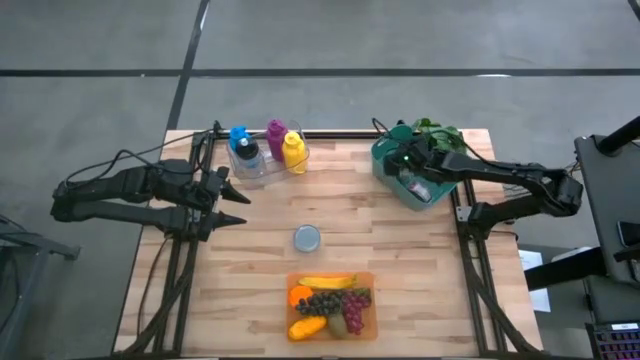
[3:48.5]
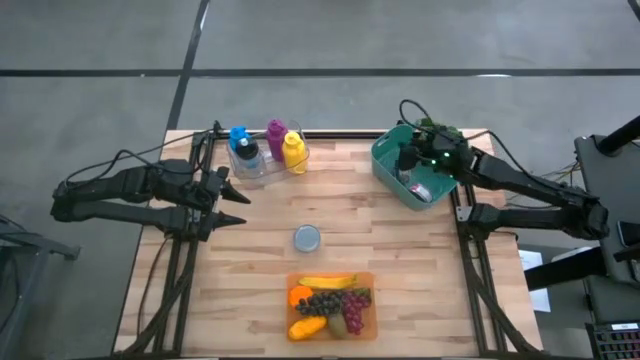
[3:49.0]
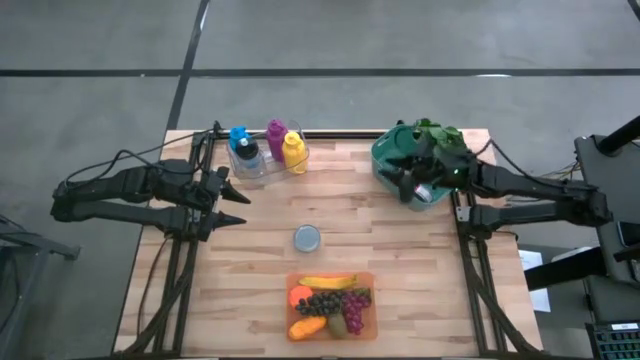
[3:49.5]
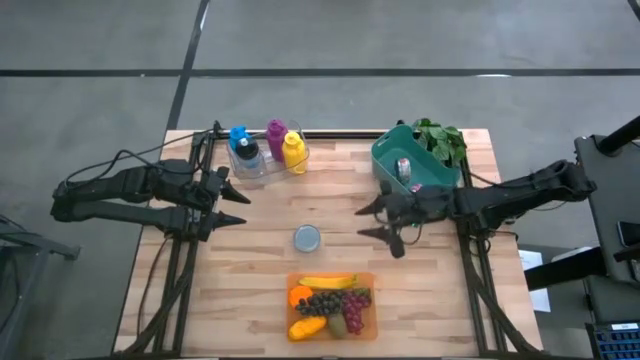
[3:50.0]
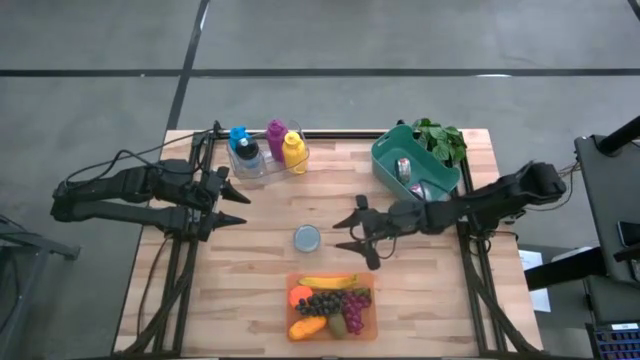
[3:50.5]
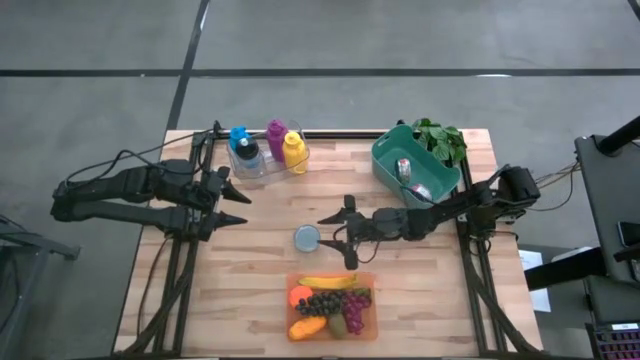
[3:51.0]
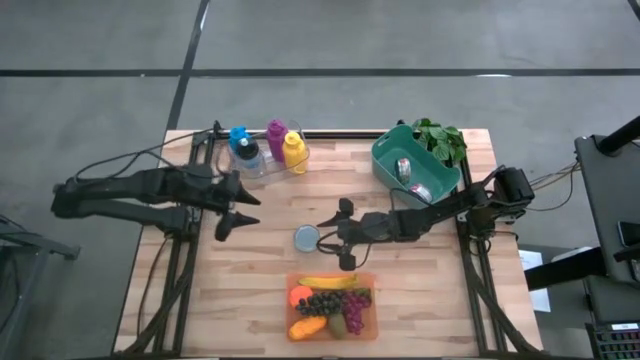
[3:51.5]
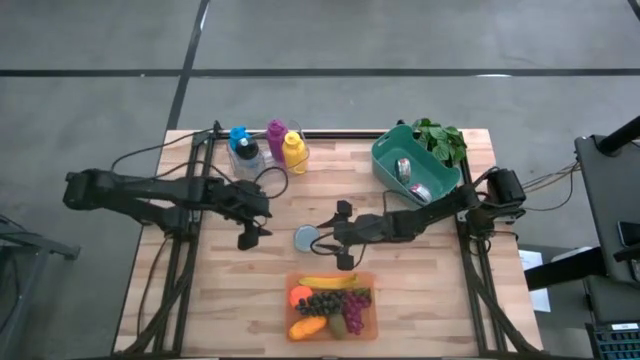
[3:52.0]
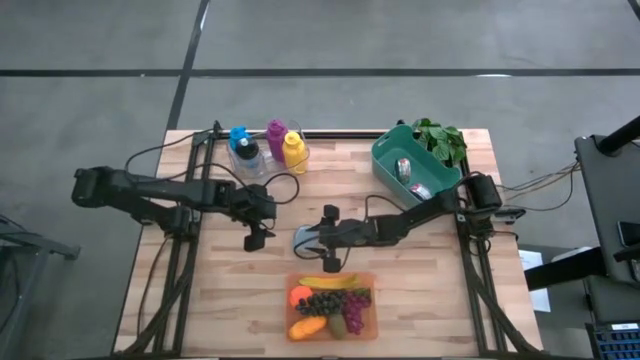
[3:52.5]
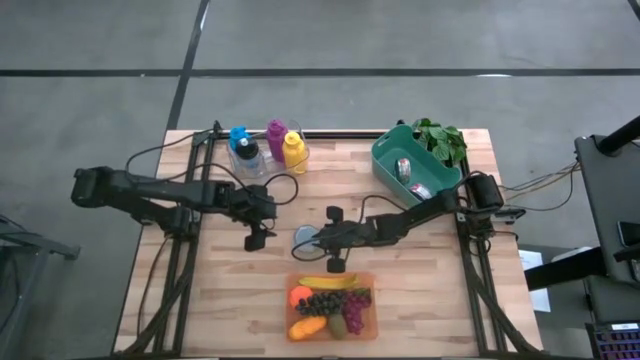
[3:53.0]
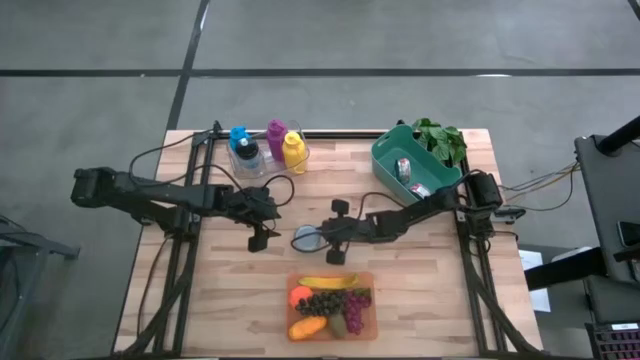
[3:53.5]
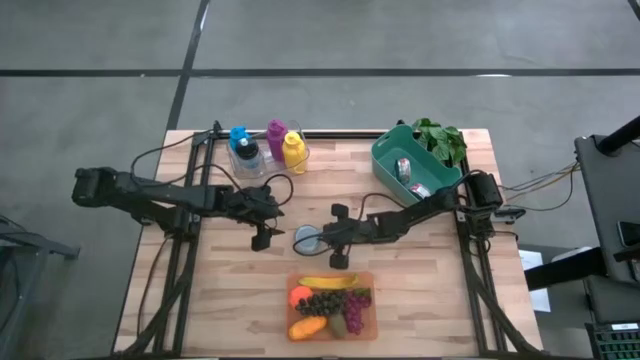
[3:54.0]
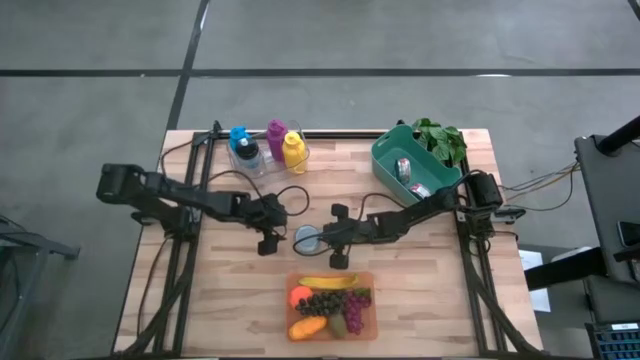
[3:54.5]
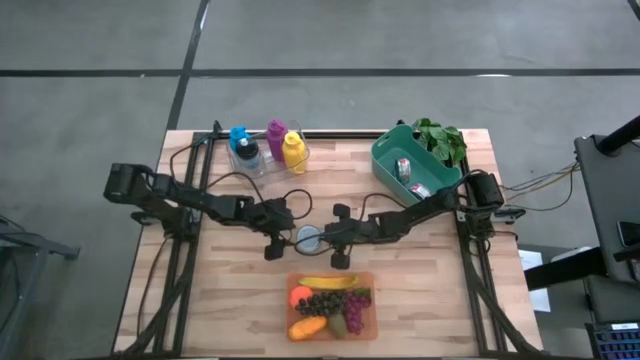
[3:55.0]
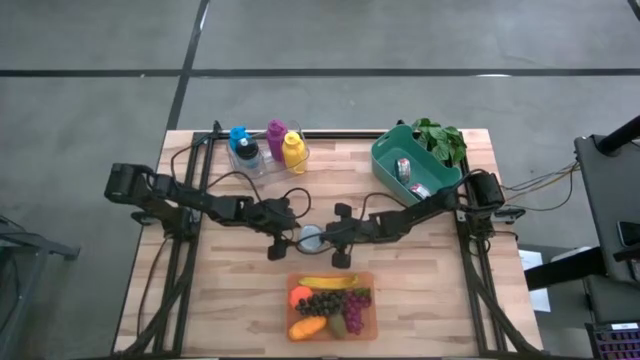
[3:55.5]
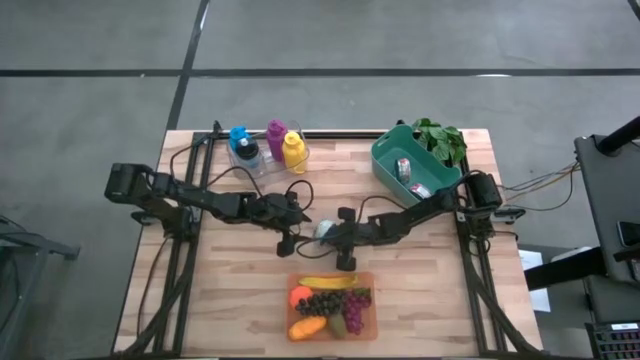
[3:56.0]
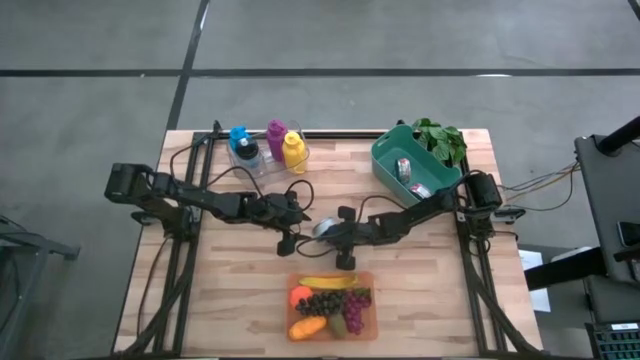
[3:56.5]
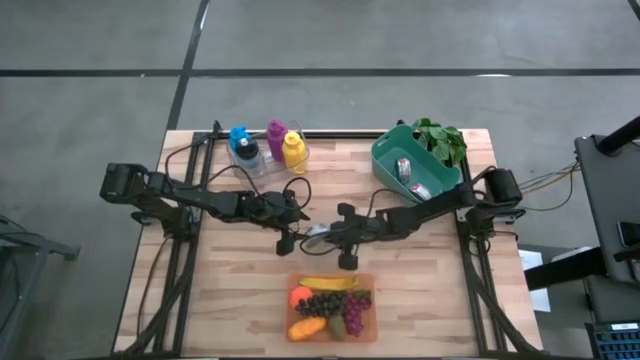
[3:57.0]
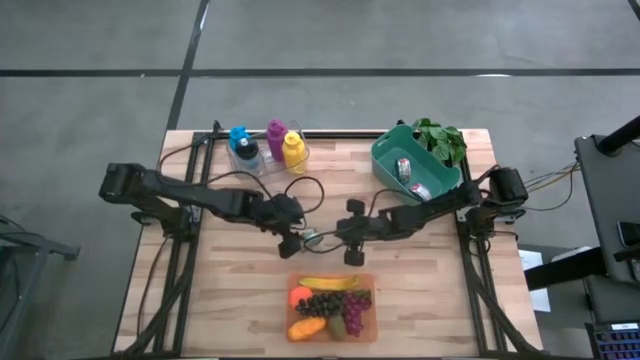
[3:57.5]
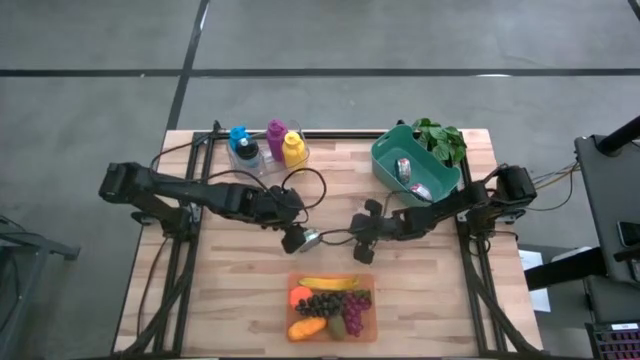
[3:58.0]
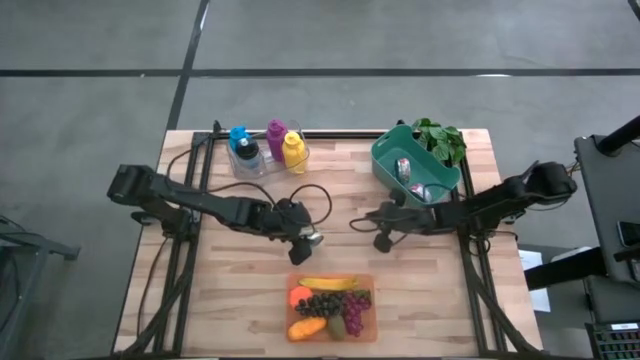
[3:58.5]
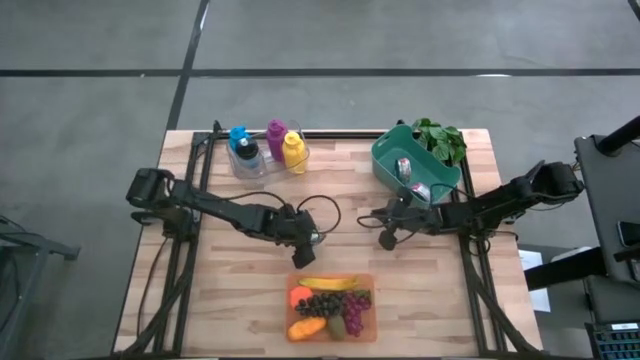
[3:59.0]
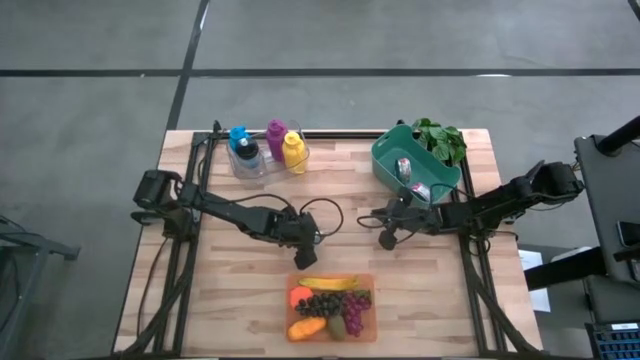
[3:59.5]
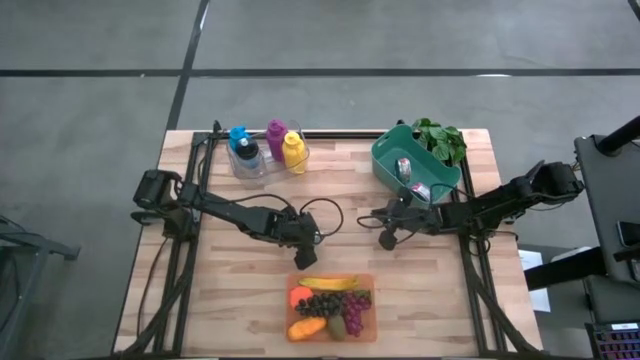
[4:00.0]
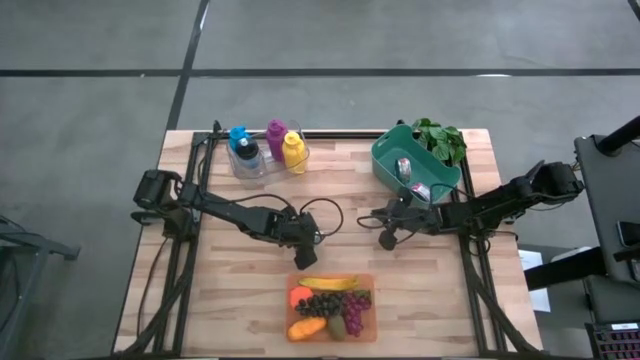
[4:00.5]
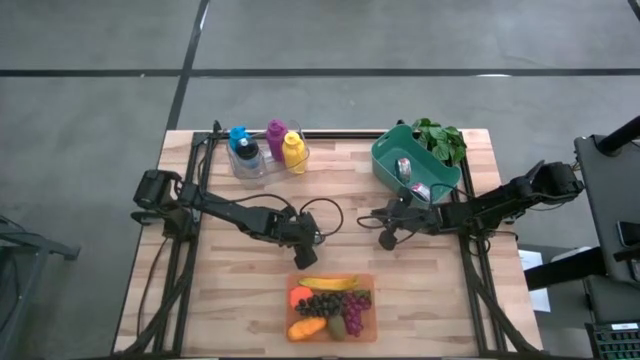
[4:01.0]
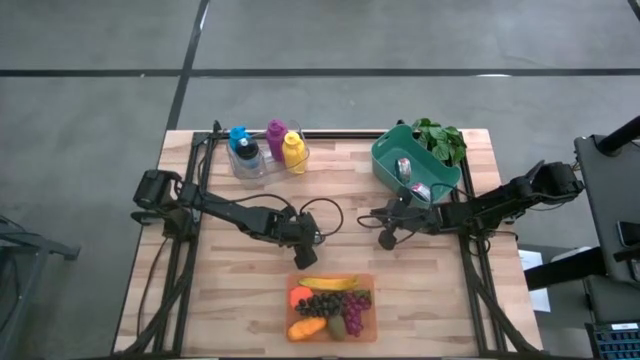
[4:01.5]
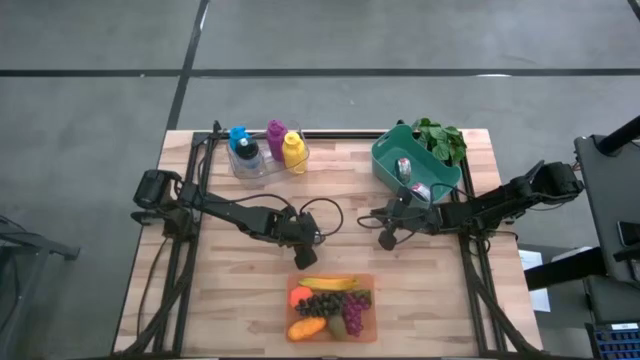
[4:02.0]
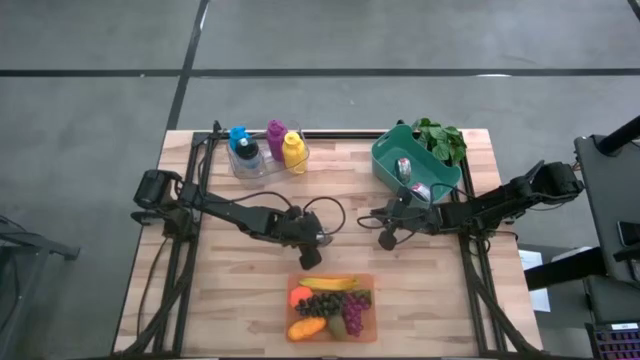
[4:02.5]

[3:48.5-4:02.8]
Task: Pick & Place Food Item
Put the green and white tuna can into the green bin

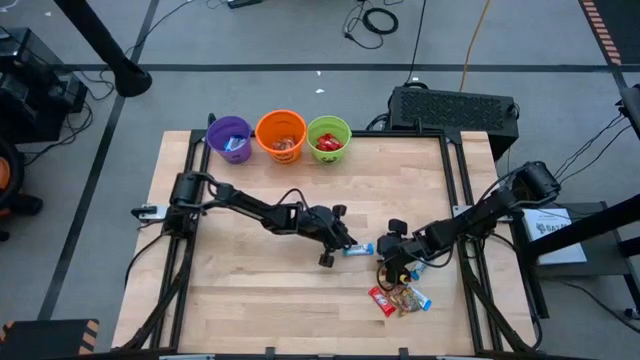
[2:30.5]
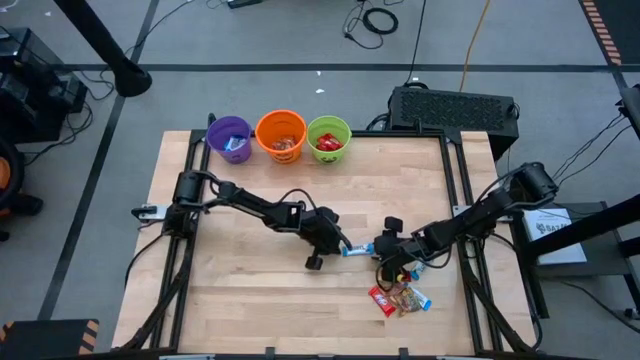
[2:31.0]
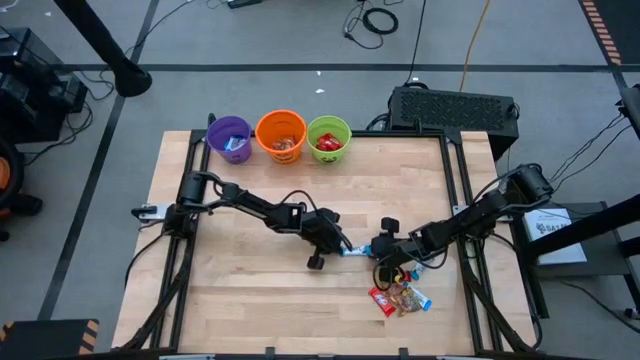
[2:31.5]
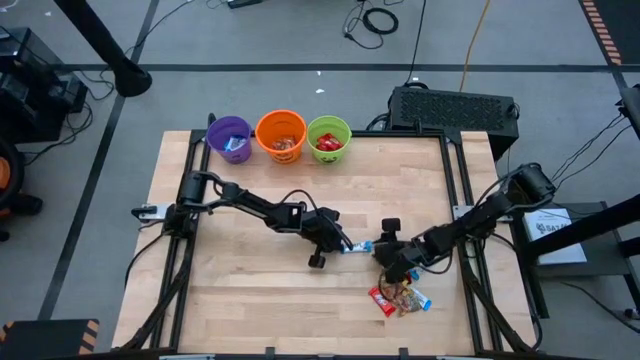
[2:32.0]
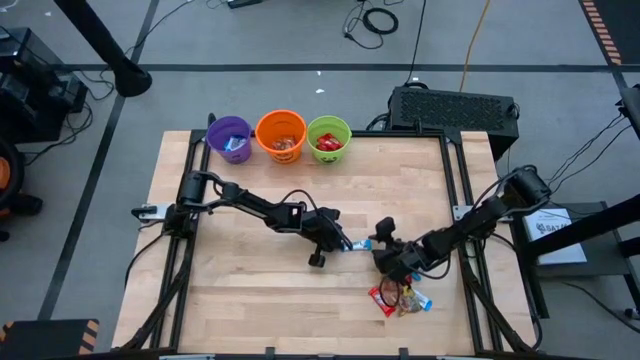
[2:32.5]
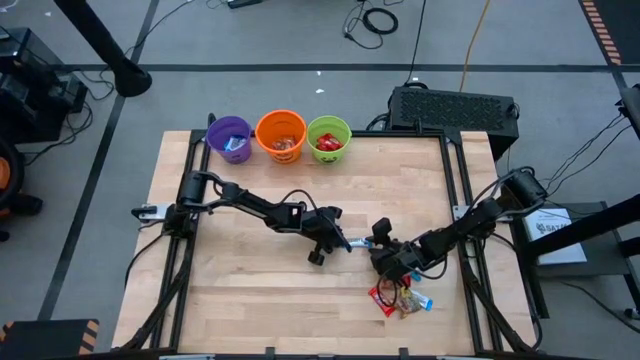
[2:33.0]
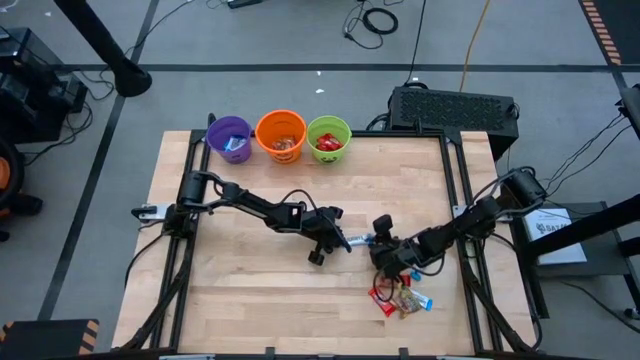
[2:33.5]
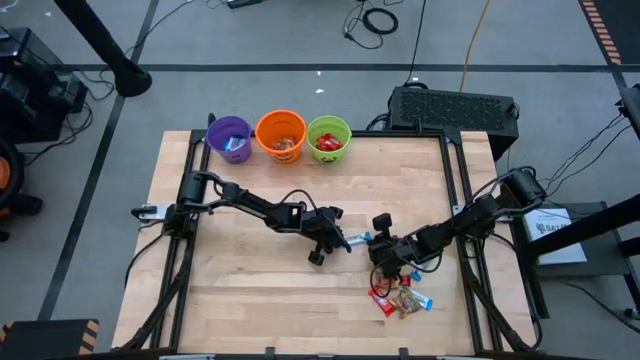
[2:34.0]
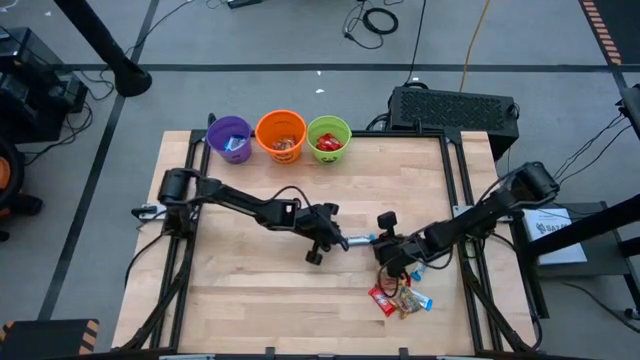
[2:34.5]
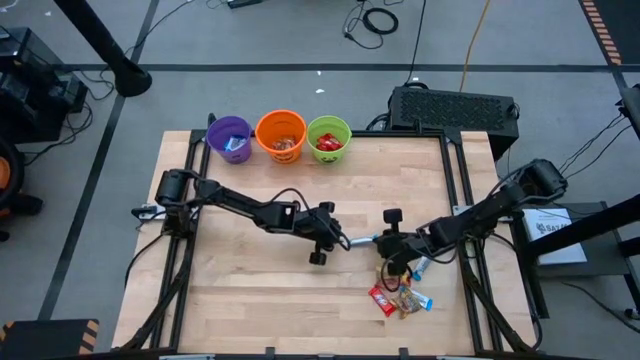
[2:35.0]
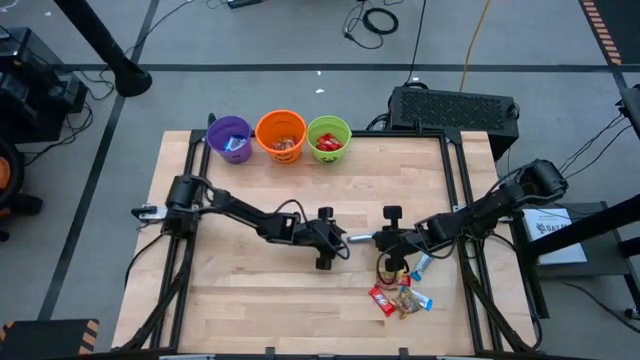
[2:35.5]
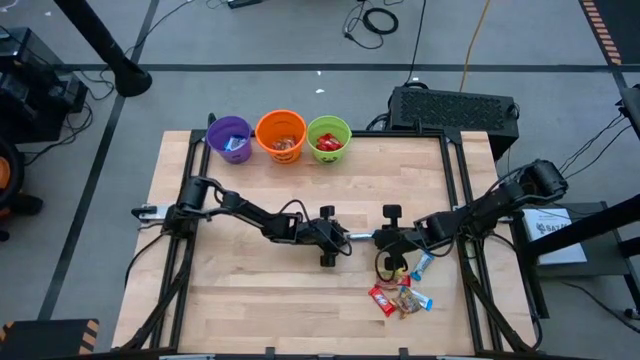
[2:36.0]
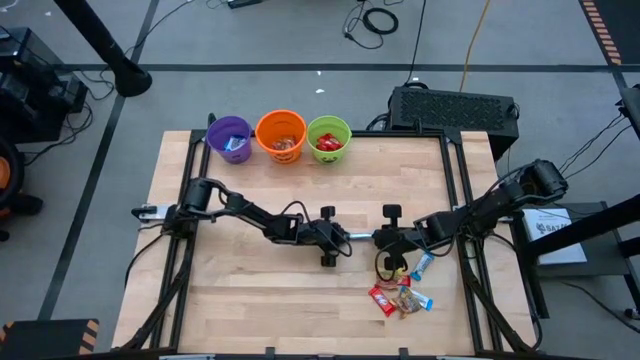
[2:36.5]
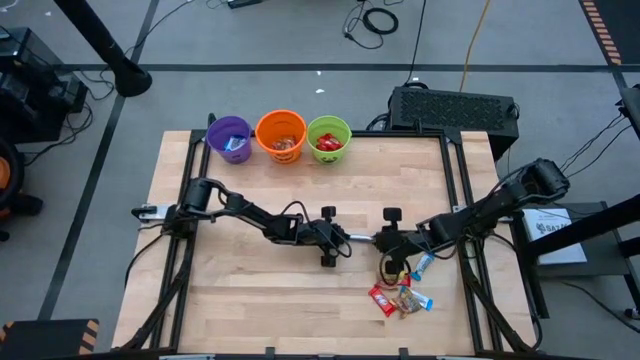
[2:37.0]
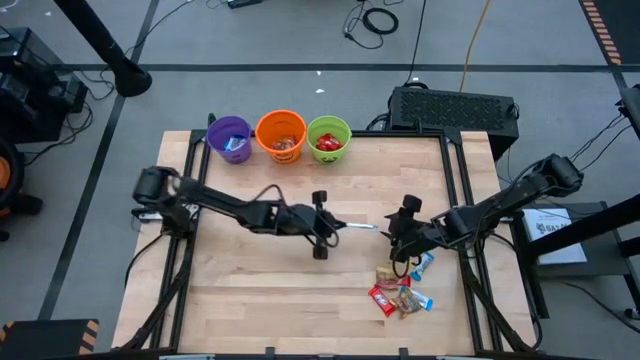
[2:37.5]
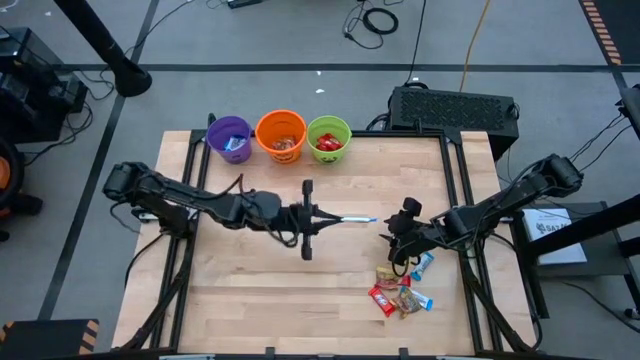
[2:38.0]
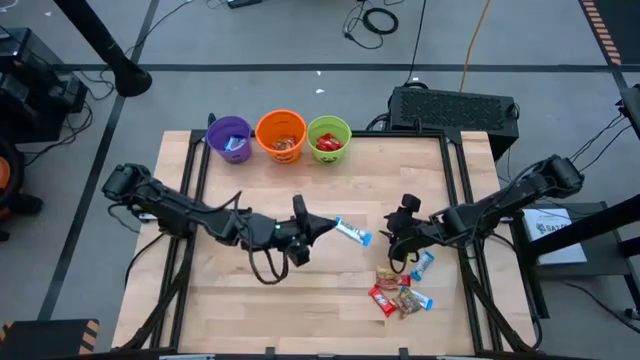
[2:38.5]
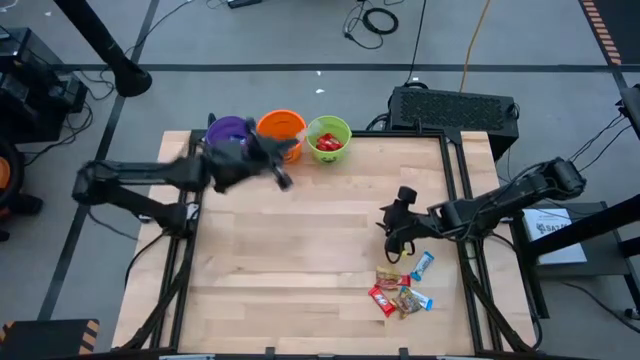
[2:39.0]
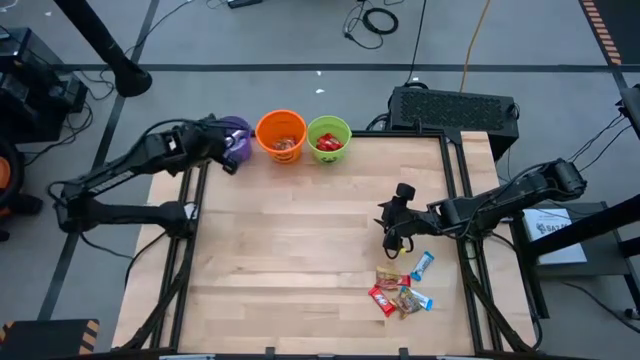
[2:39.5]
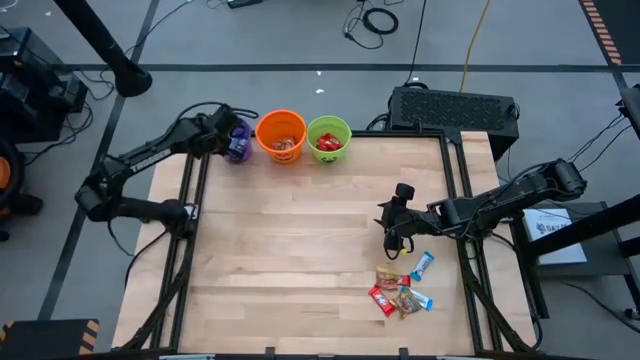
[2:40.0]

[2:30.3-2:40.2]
Task: Sort candy by brand, put in halloween buckets
Put the white chocolate bar into the violet bucket
